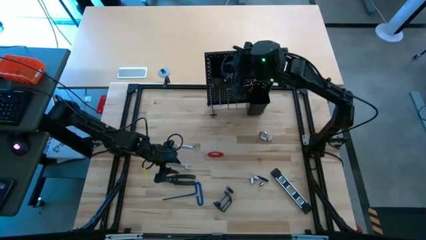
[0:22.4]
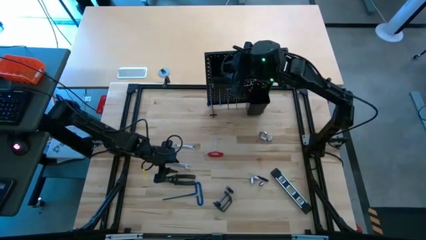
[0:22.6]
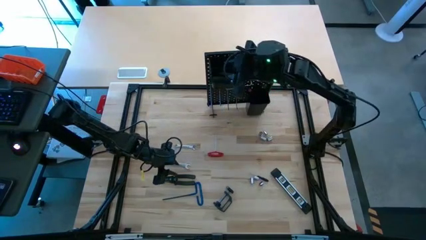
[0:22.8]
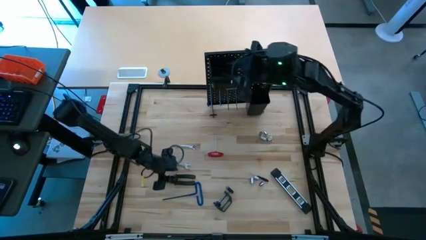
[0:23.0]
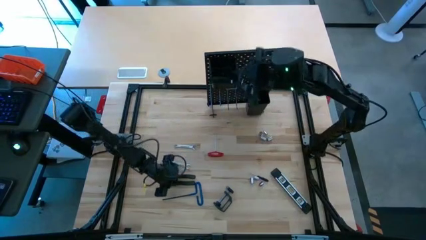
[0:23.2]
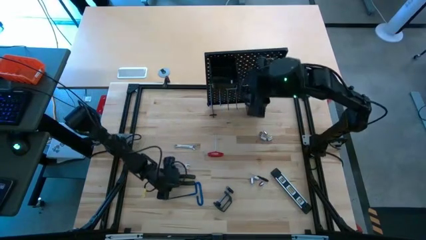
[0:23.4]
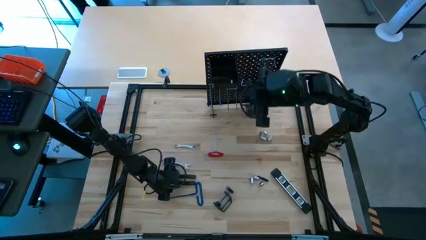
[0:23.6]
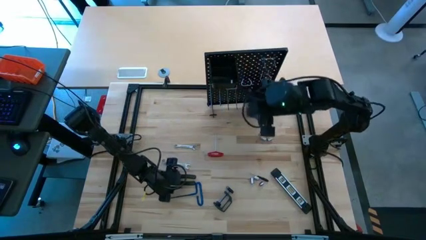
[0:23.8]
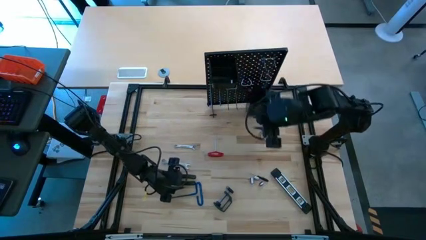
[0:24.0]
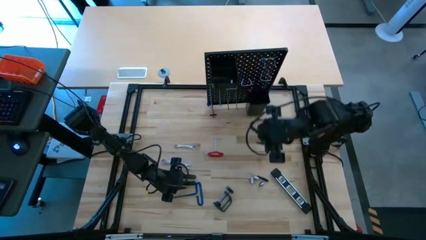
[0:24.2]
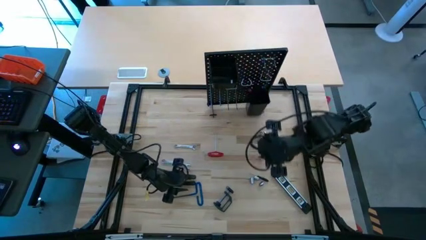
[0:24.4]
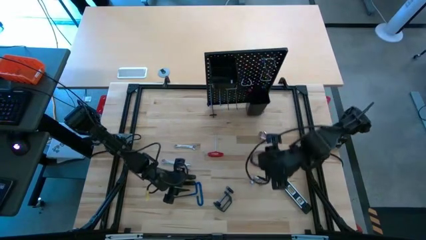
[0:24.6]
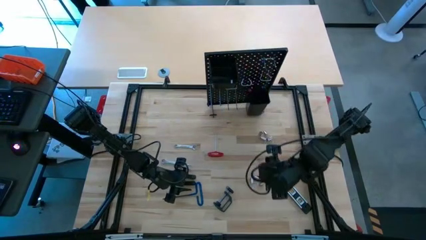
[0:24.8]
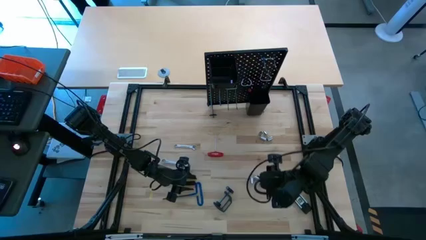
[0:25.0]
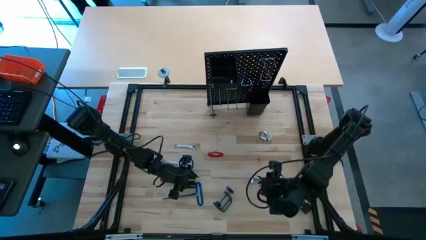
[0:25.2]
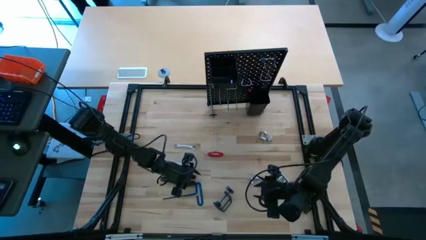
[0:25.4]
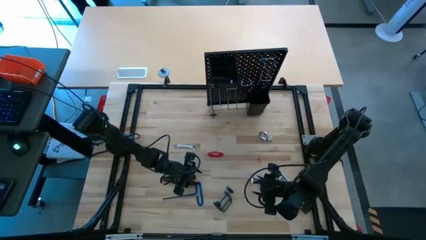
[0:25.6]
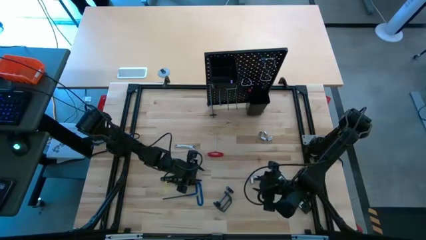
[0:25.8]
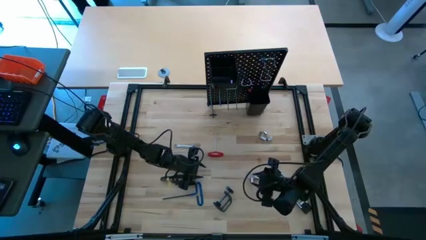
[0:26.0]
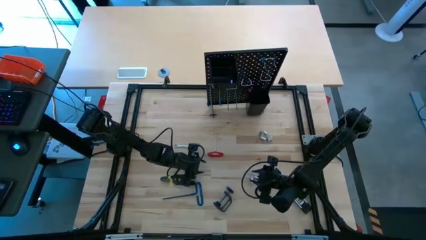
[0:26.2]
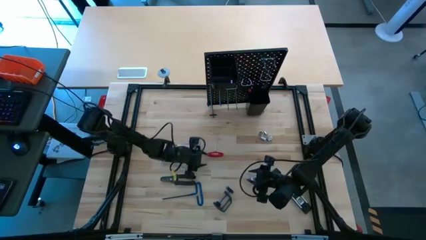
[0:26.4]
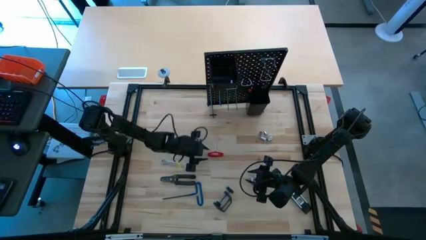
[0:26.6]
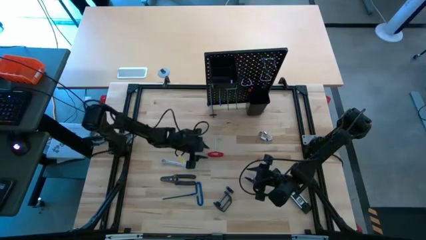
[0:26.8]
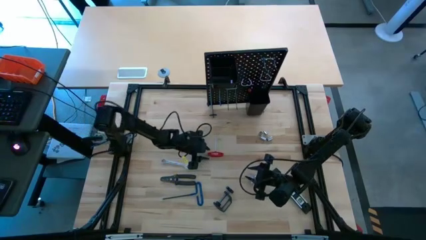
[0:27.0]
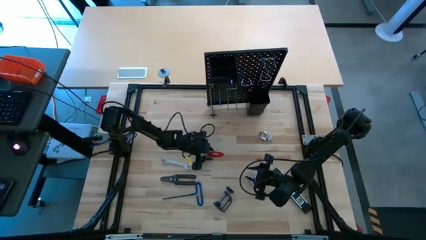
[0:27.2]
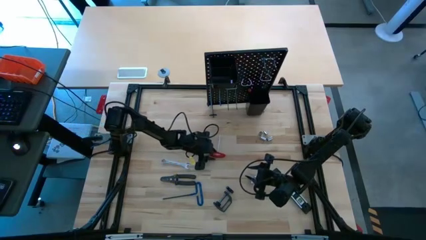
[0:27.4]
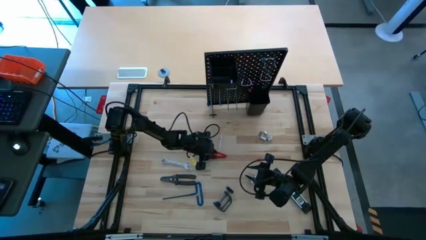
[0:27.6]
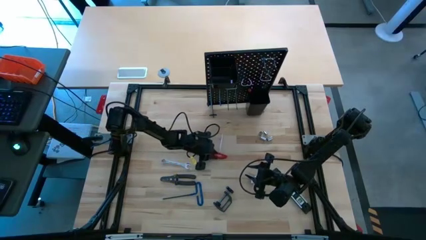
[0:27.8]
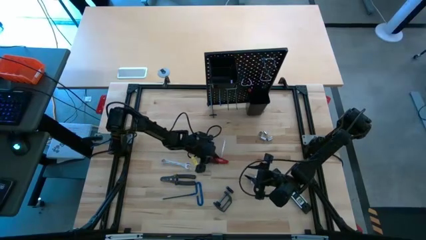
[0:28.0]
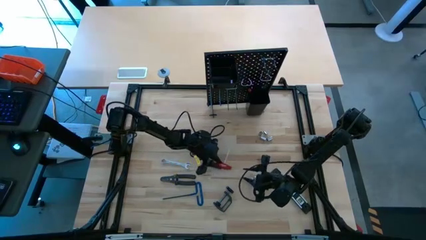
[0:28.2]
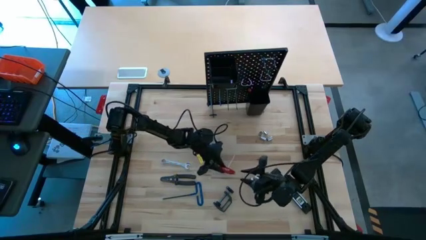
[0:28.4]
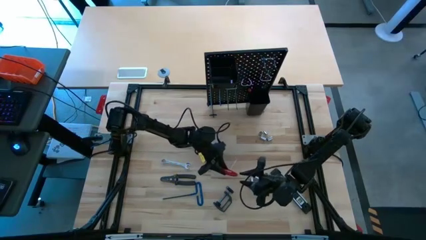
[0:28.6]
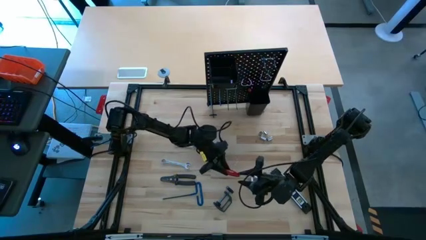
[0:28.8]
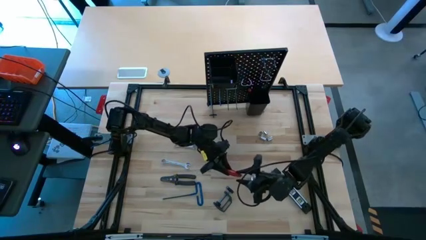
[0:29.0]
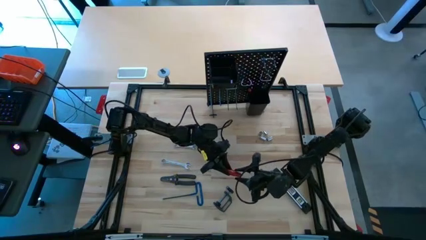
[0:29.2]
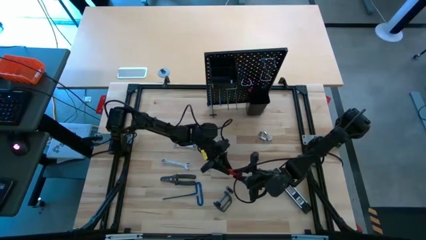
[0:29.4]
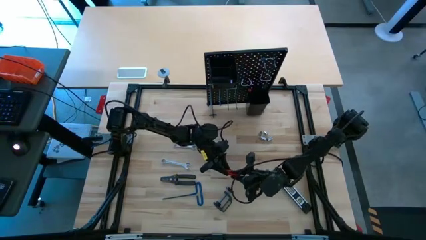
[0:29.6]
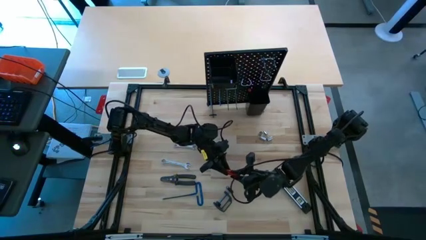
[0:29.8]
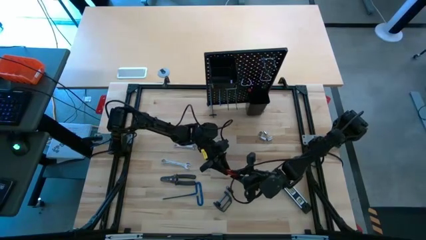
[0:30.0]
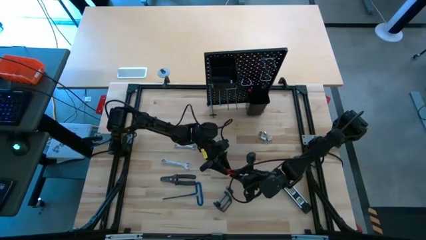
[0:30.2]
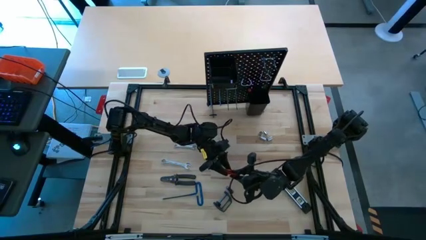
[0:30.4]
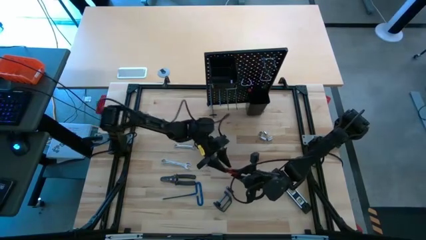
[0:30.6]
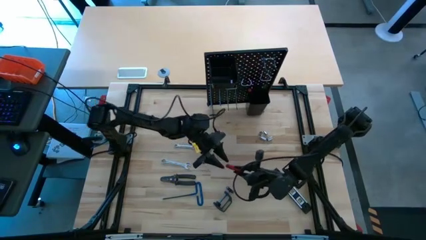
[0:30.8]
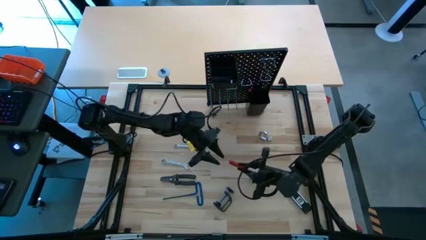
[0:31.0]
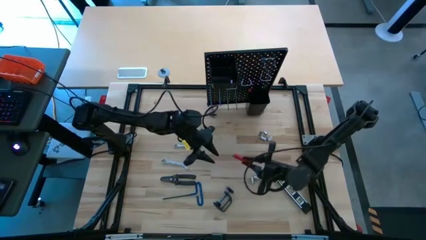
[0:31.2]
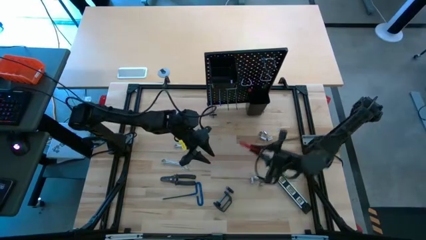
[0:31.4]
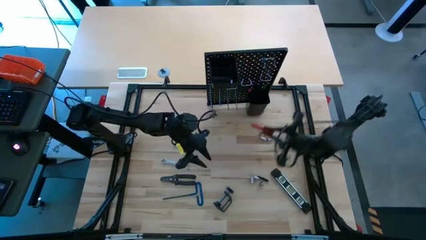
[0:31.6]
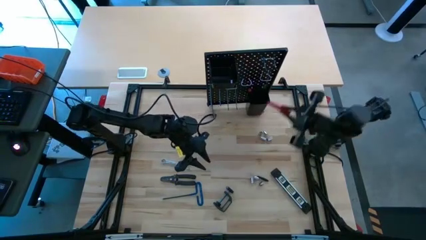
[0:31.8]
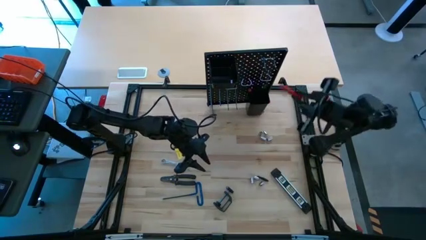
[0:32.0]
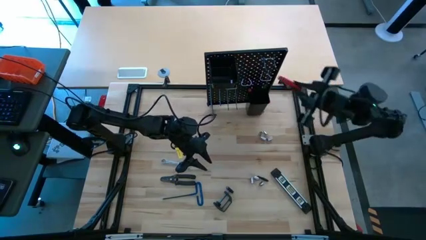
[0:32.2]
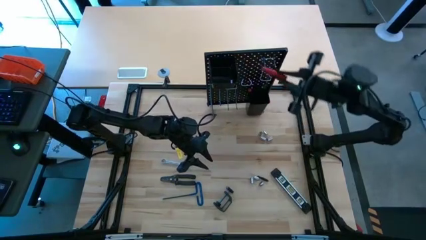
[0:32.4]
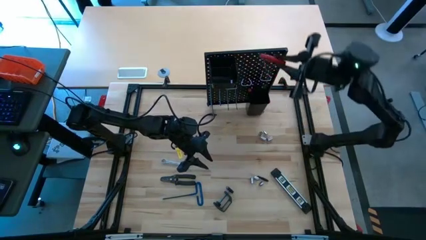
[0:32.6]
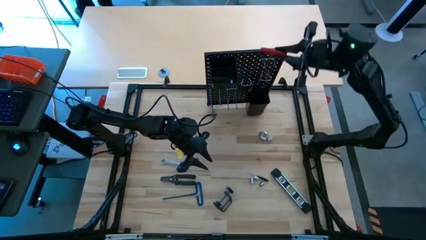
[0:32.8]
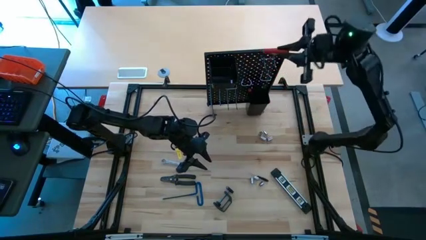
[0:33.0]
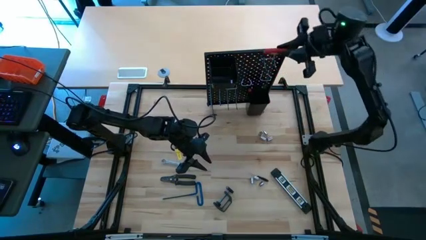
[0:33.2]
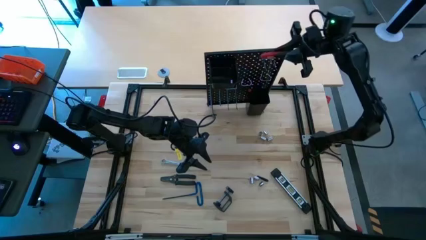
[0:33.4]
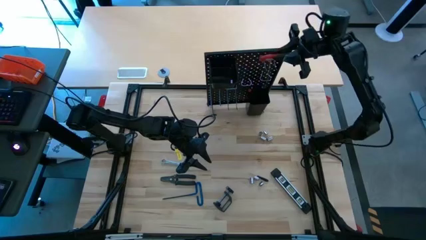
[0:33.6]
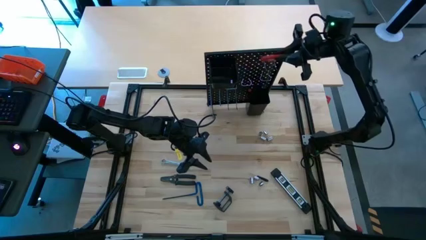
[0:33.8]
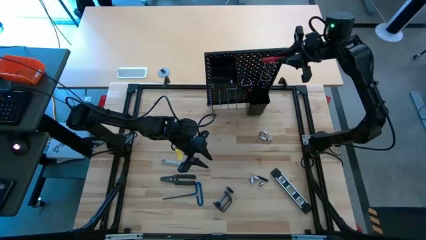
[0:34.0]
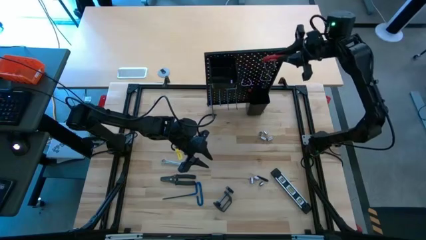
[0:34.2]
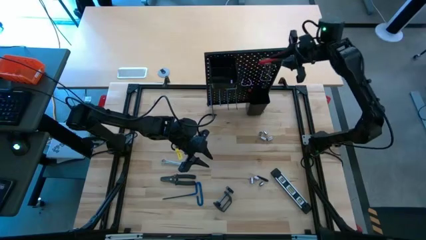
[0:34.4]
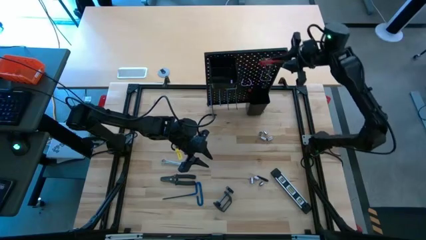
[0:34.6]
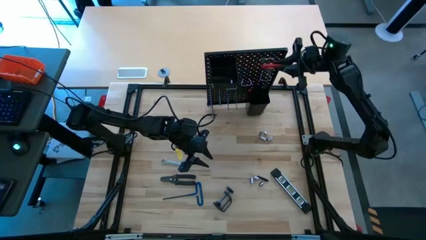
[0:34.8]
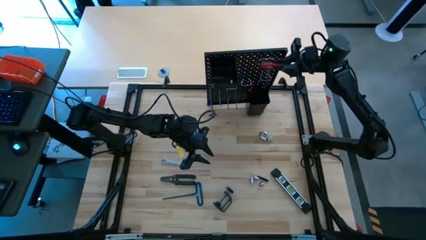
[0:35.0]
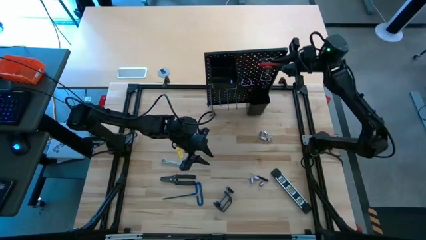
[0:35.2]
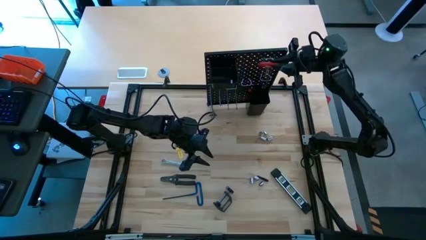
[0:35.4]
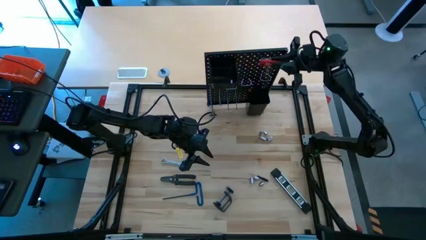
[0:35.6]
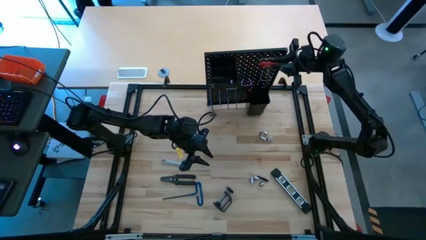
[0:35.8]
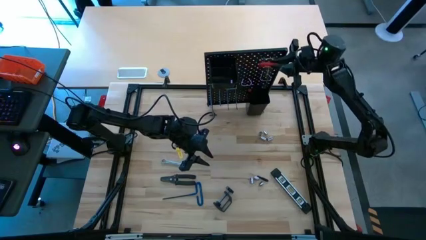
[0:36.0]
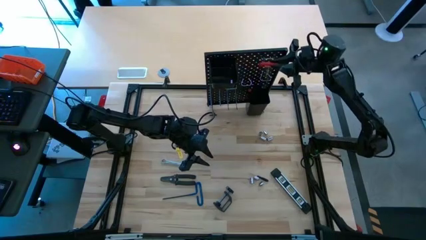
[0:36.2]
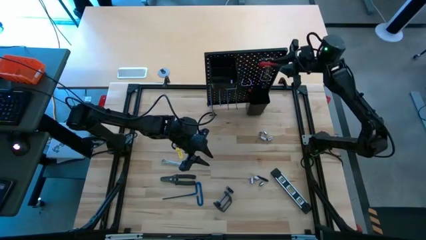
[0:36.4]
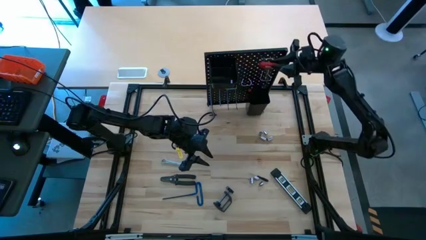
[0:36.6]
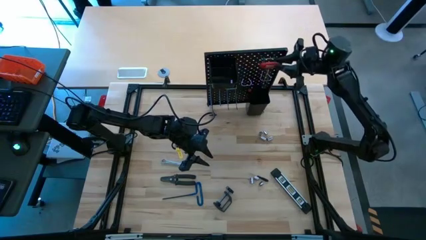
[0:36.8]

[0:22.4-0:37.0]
Task: Hang tools onto peg board
Hang the red allen wrench on the peg board
